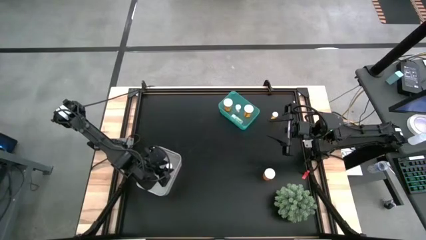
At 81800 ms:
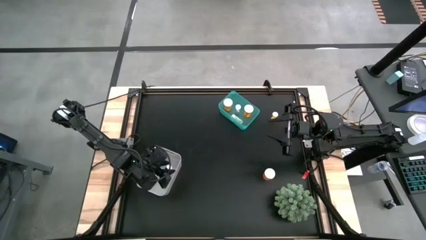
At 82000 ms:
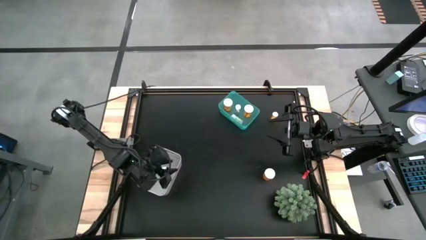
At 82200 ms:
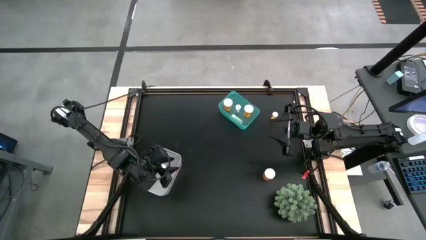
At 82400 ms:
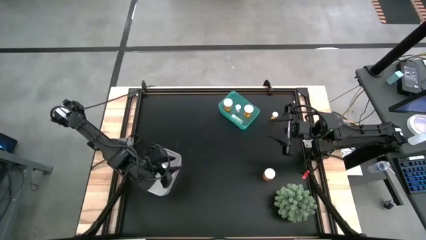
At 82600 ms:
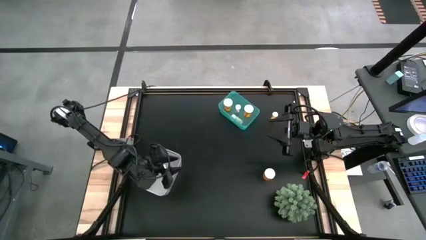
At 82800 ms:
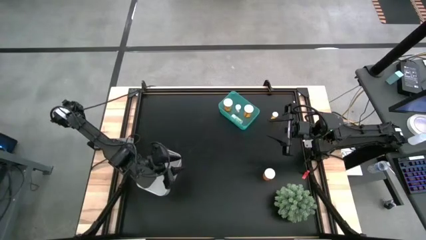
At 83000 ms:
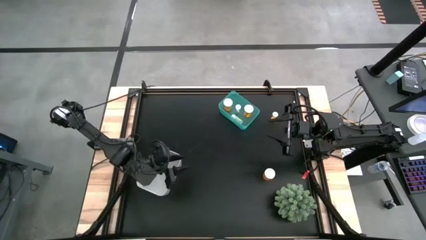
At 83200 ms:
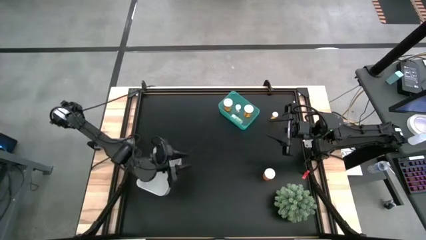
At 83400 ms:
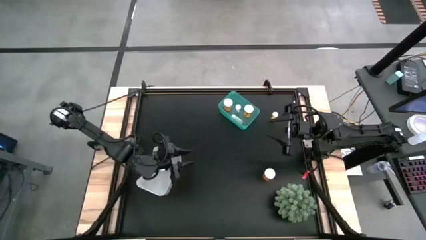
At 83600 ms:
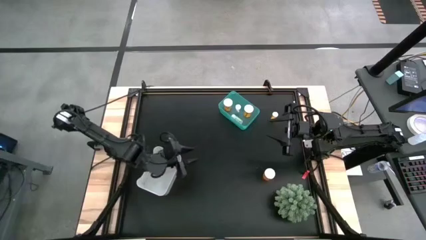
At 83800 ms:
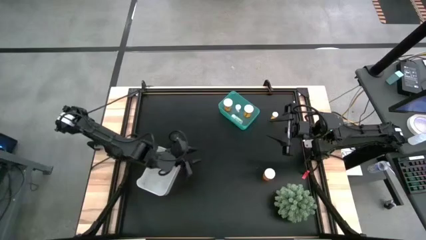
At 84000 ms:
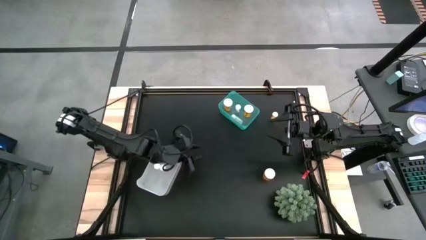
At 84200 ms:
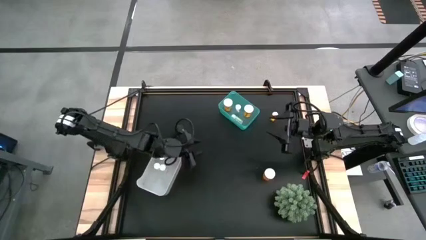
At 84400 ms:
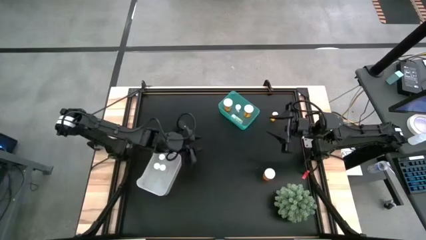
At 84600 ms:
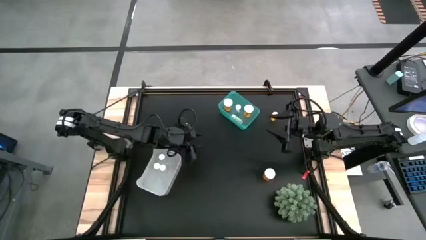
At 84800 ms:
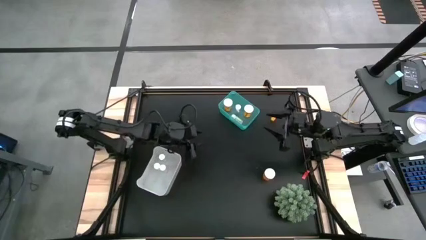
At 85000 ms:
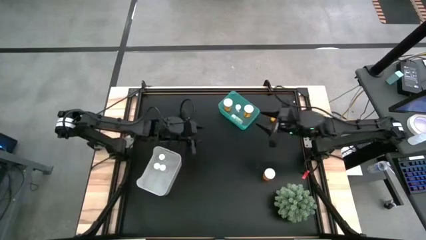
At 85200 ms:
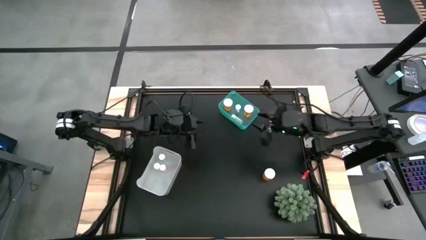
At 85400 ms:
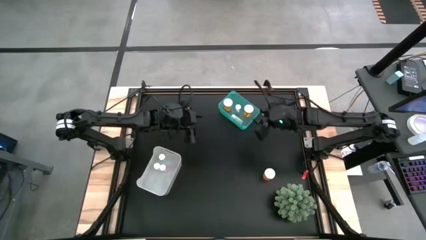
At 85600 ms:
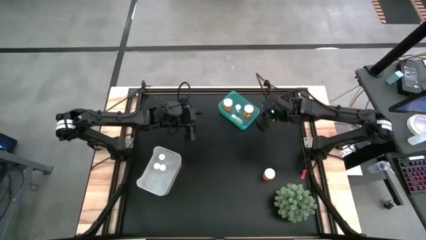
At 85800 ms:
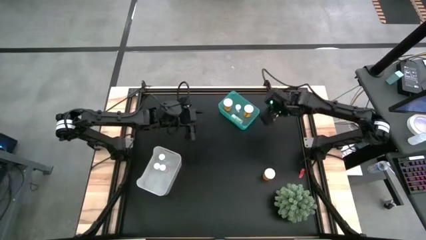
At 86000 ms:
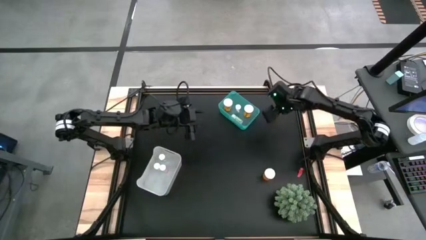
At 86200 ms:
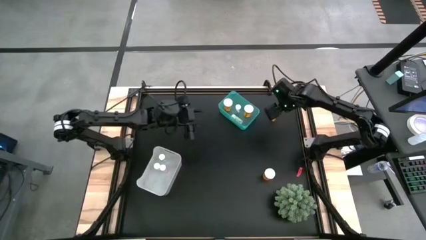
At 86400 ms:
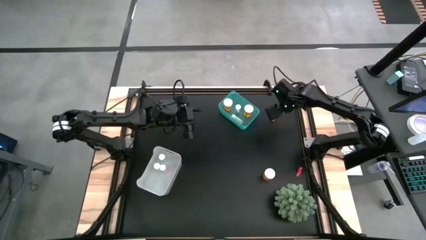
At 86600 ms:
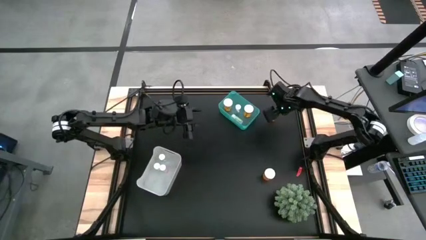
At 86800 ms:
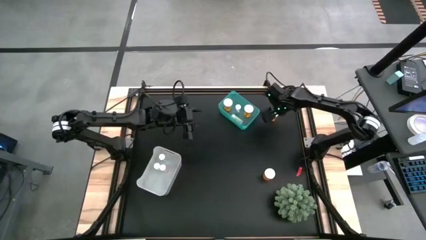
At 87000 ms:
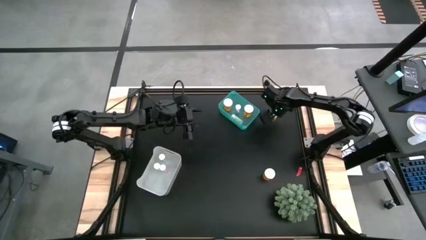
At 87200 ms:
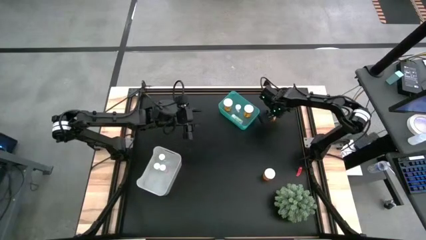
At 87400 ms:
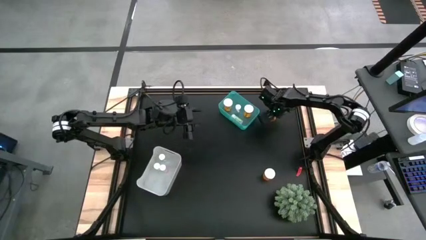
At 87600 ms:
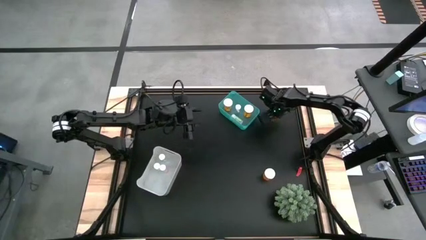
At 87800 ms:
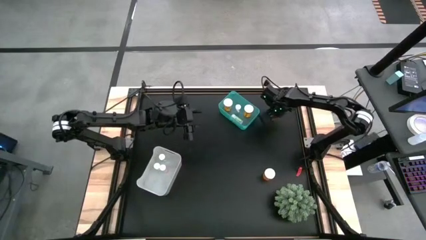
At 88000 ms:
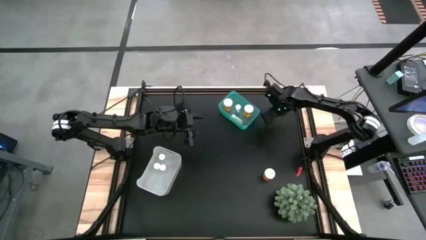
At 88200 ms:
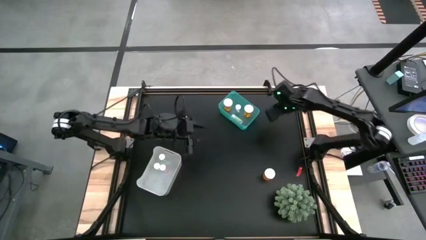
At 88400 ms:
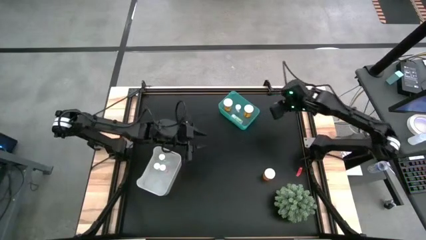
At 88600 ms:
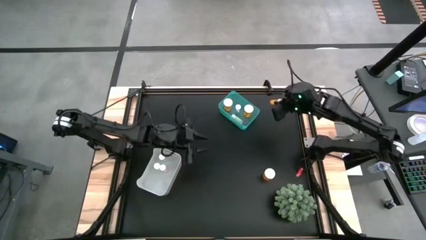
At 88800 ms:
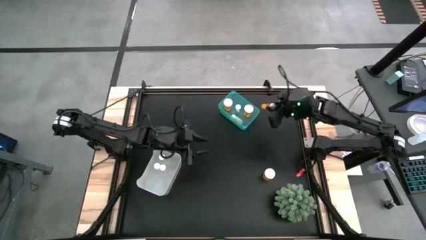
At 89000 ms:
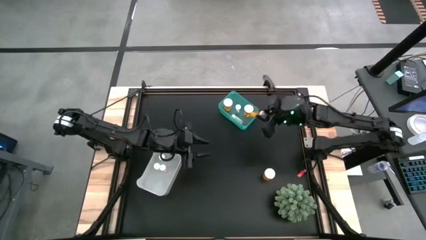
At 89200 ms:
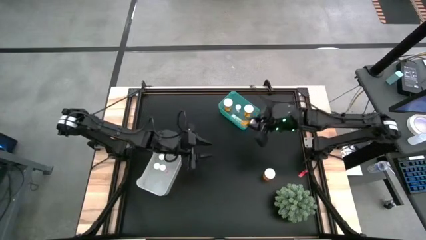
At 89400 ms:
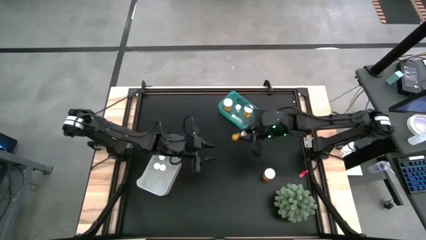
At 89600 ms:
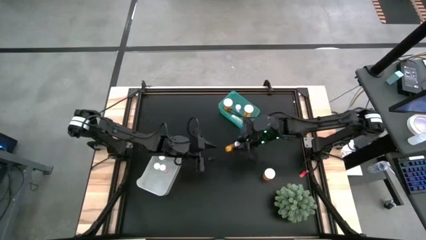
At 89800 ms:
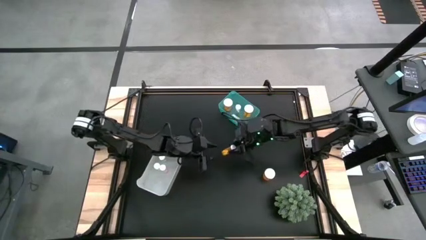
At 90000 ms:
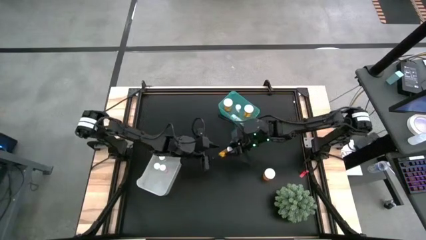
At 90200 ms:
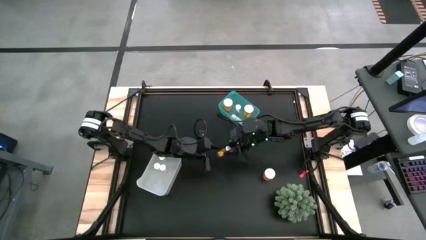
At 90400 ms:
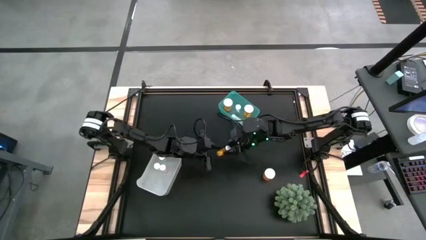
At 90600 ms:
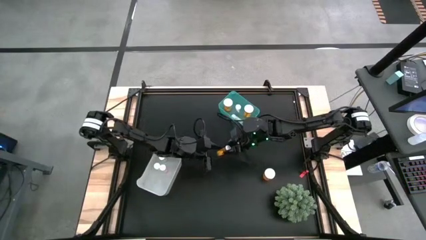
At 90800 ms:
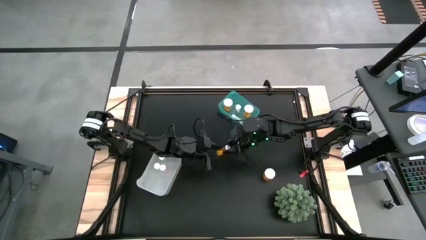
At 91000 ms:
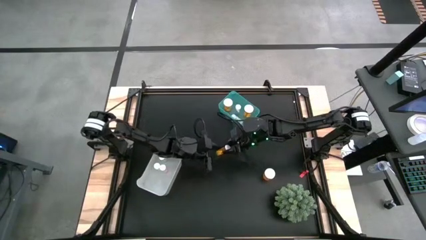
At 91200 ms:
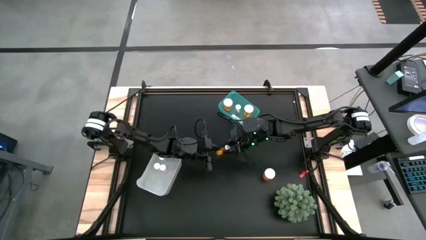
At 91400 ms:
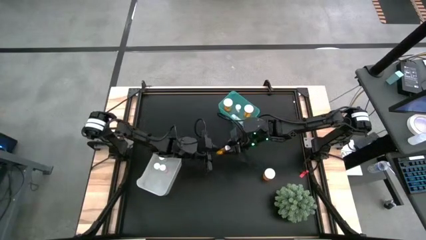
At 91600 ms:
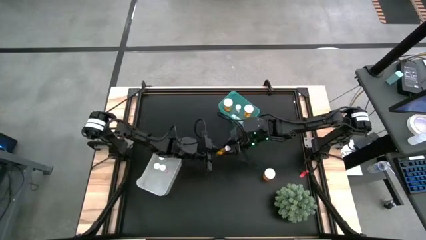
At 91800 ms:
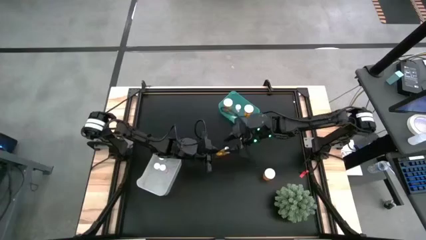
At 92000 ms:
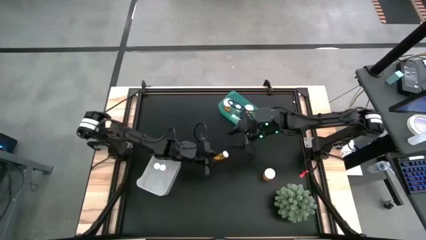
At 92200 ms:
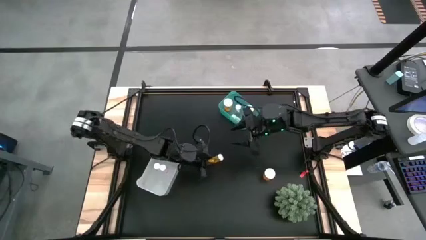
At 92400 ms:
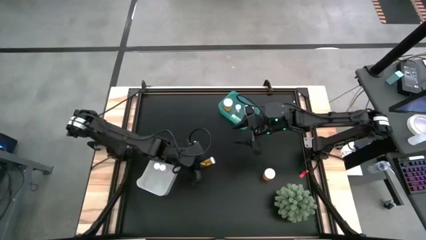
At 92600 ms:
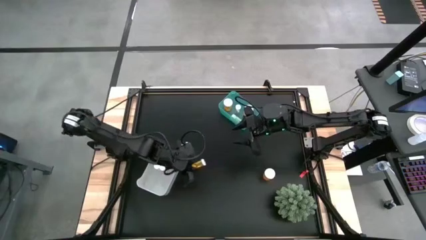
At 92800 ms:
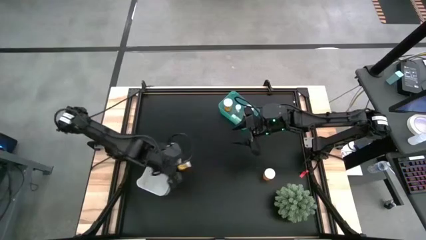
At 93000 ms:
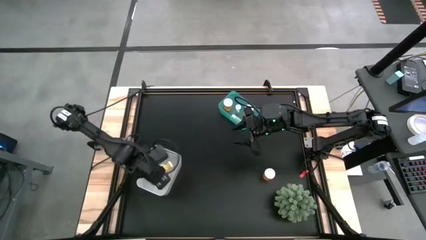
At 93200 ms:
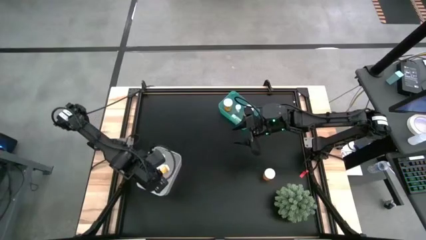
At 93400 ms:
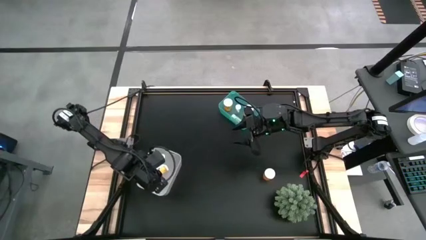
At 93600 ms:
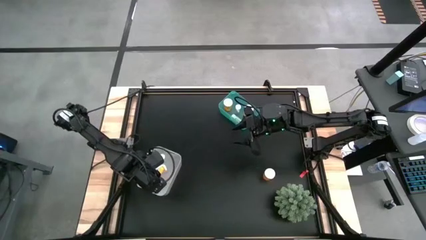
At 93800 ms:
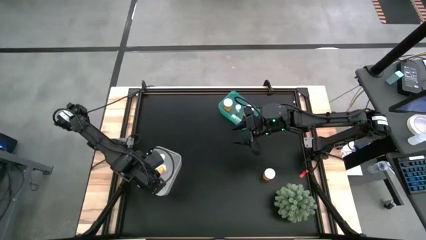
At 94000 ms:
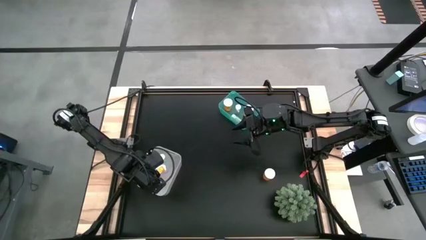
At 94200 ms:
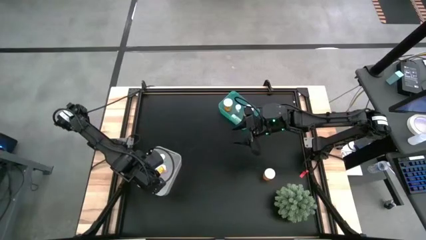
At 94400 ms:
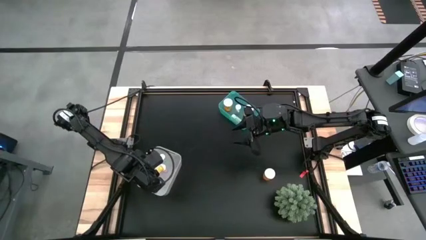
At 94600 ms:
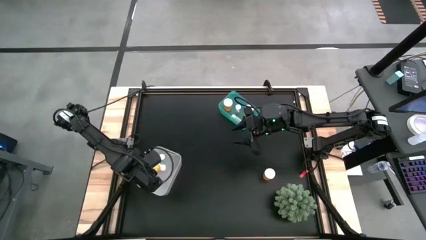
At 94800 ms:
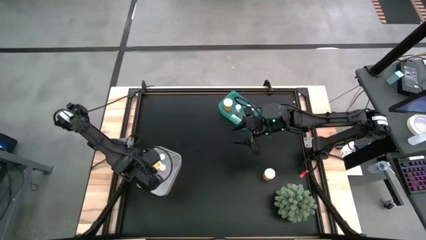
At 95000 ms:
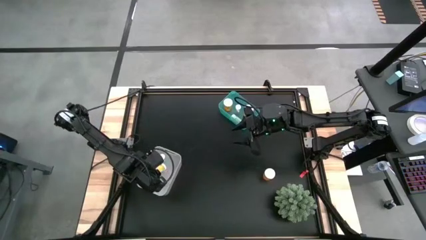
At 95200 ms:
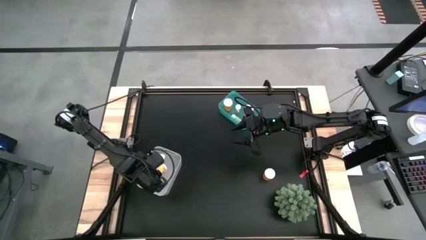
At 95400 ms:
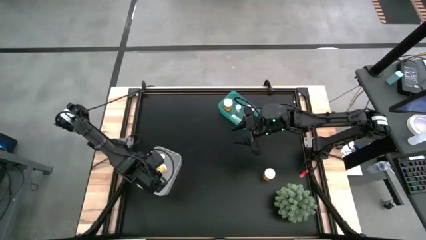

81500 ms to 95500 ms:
Task: Pick and place medicine bottles into bin by pill shape (circle, oval)
Put the orange tablet bottle into the gray bin
